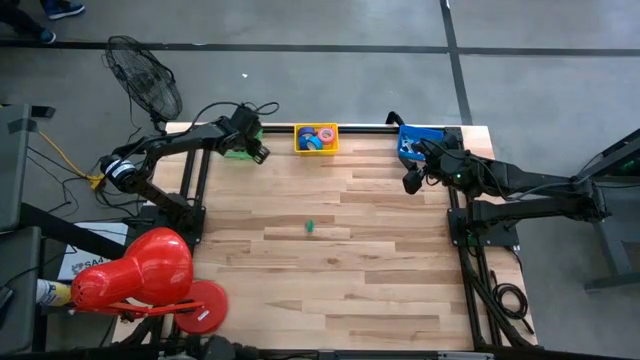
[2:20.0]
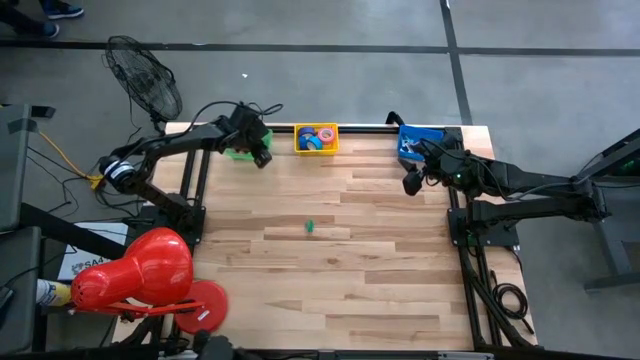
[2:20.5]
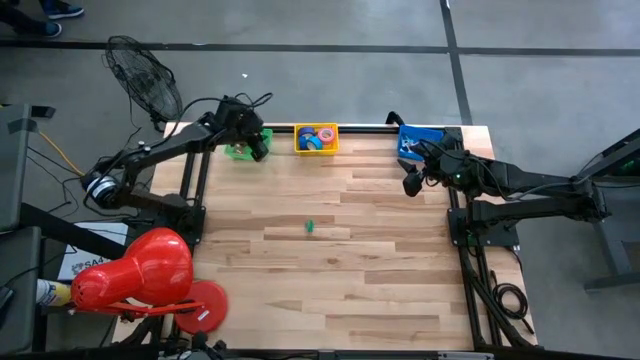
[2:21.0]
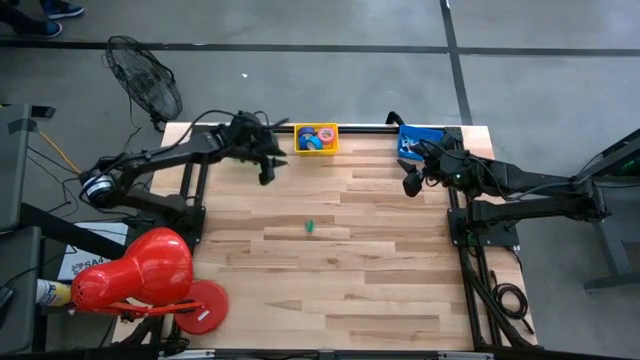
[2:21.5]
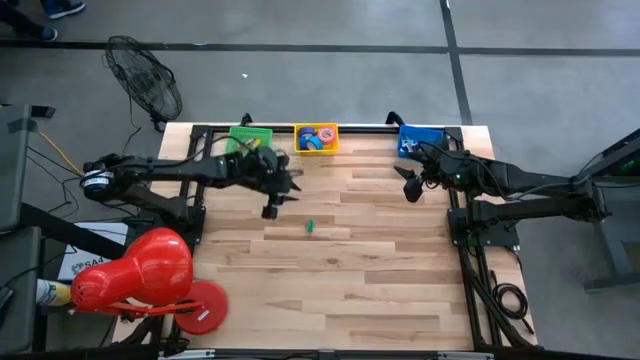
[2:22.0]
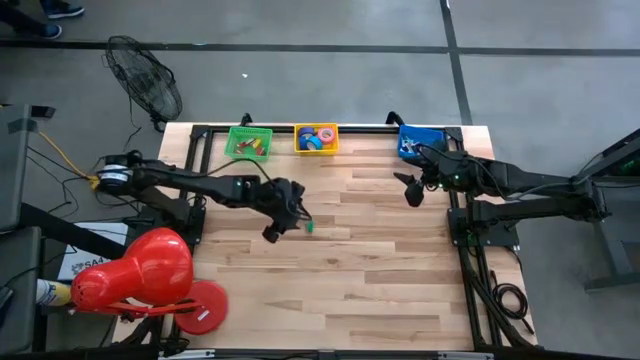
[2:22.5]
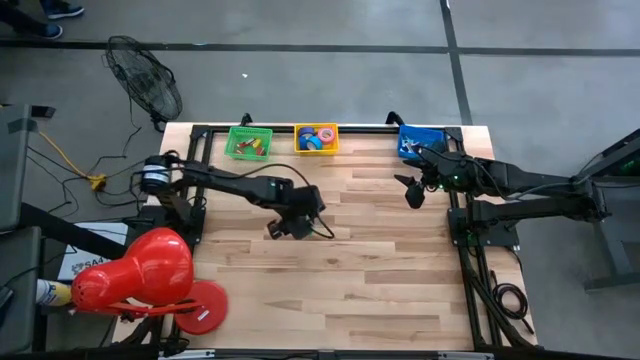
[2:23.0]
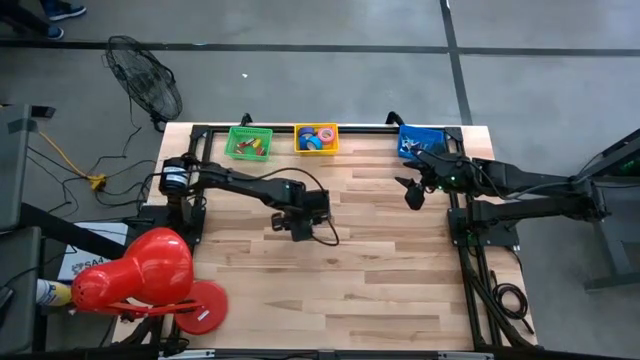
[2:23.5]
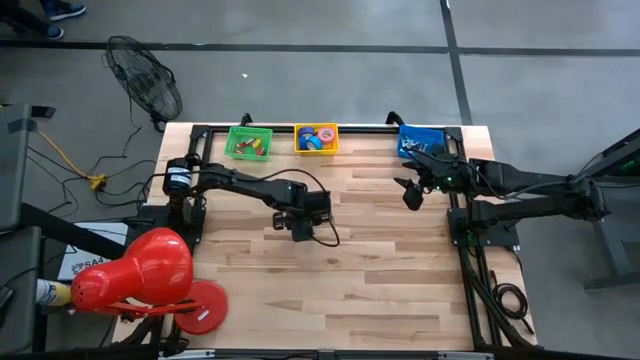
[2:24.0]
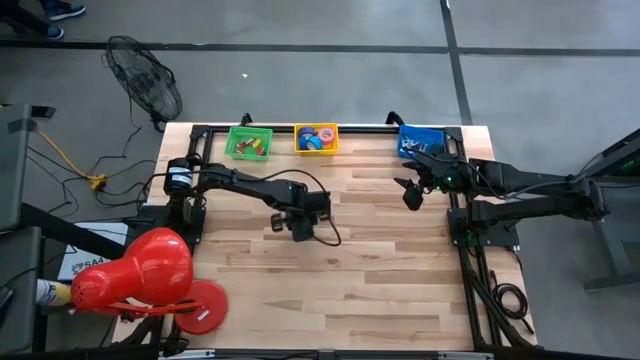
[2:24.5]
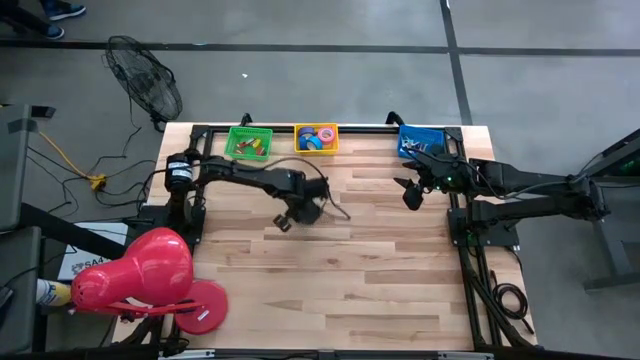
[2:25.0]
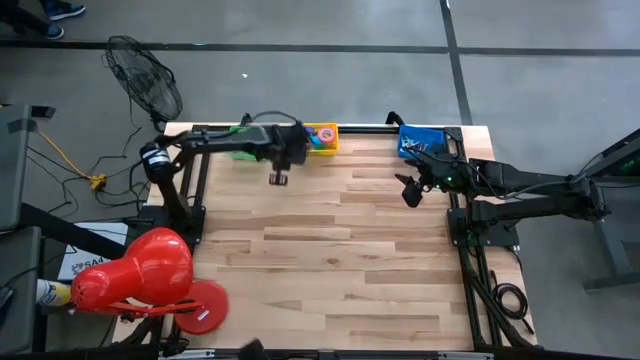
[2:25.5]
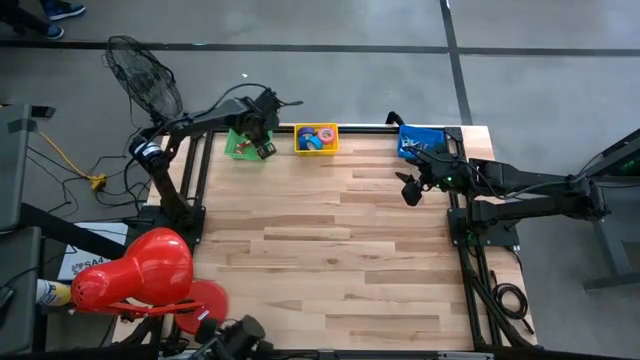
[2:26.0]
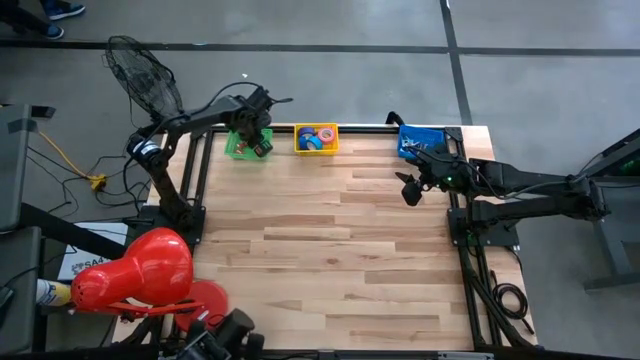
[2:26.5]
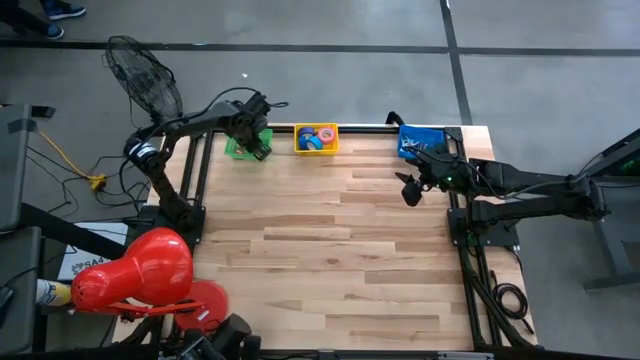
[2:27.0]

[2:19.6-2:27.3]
Task: Pick and place Stapler, Stapler remover, tape
Put the green stapler into the green bin

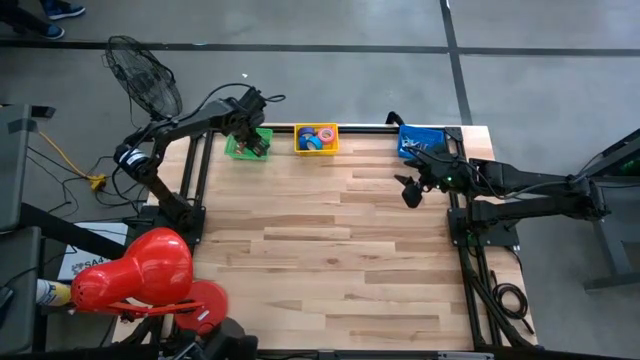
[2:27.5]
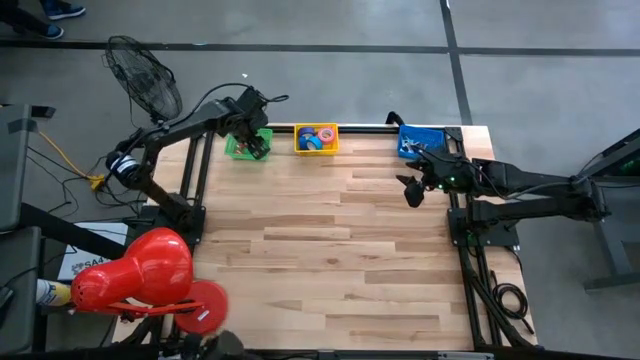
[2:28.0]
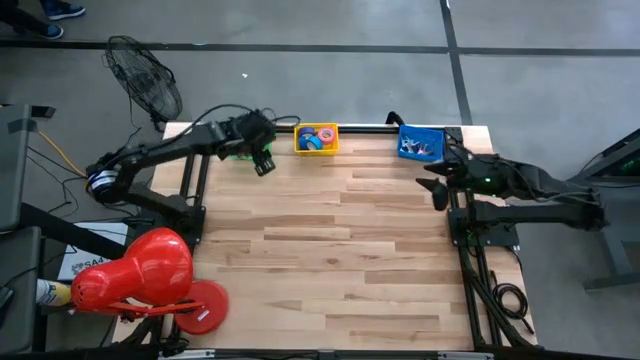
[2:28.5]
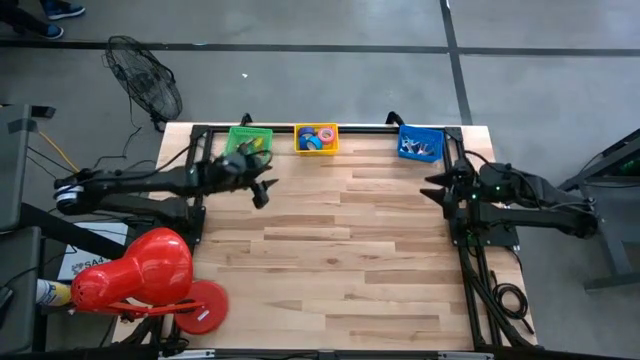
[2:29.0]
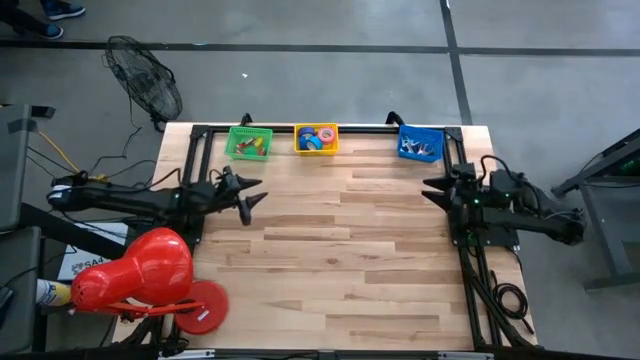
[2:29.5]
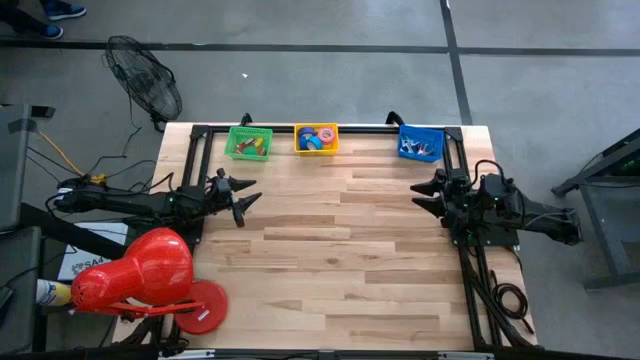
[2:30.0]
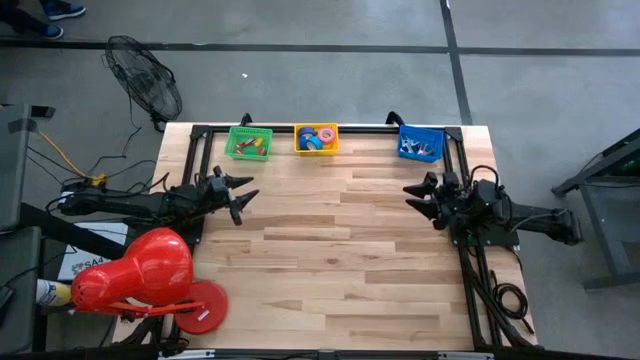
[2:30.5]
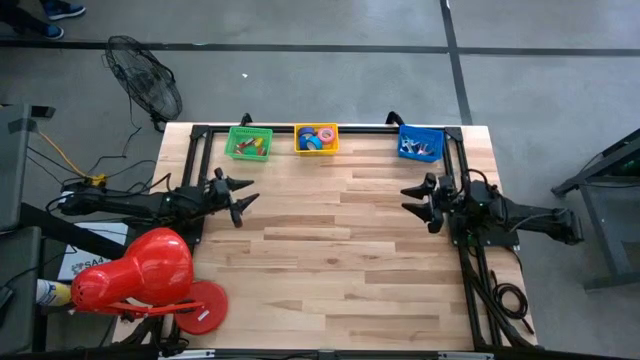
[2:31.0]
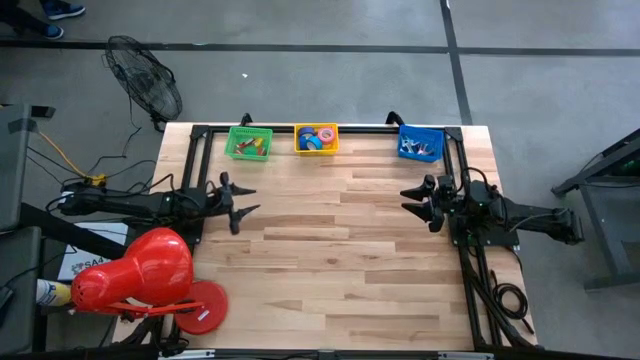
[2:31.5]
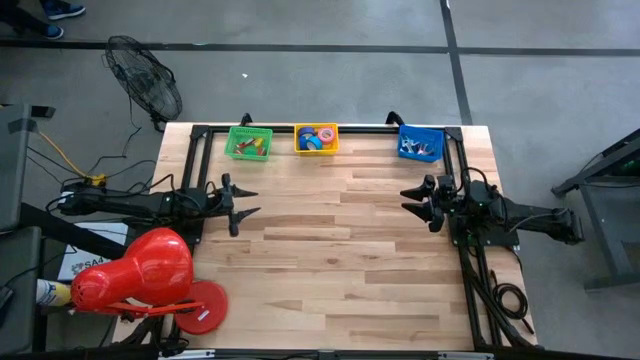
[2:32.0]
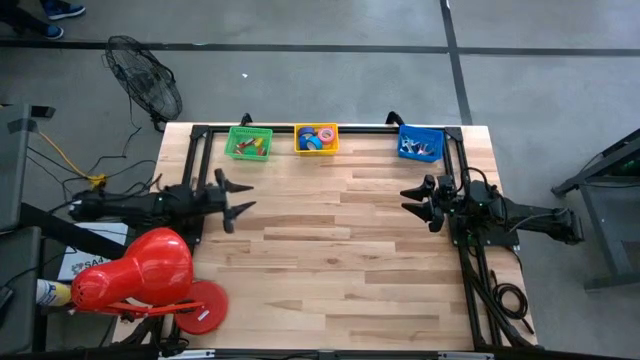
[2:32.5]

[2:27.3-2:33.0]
Return to Home Position
